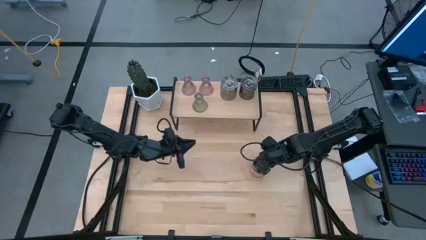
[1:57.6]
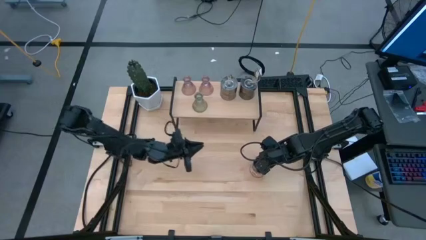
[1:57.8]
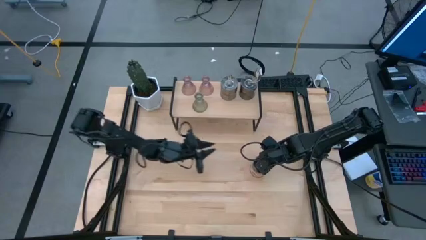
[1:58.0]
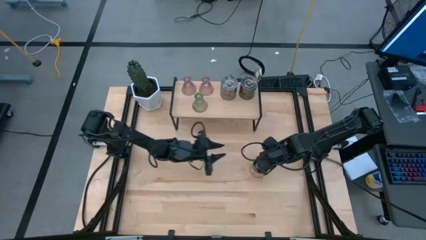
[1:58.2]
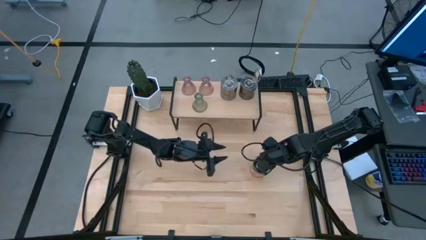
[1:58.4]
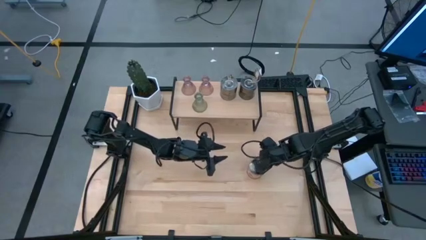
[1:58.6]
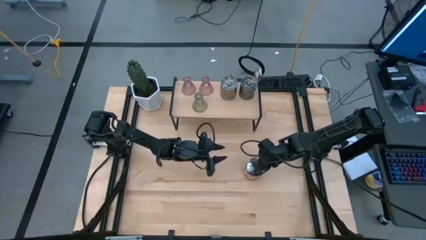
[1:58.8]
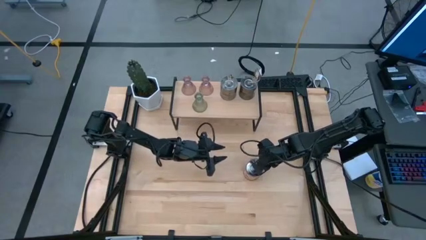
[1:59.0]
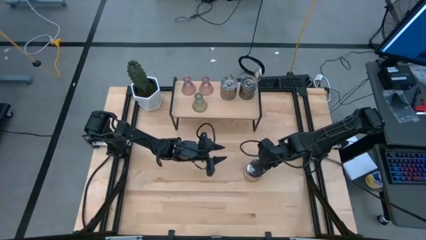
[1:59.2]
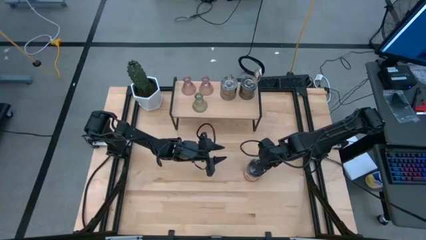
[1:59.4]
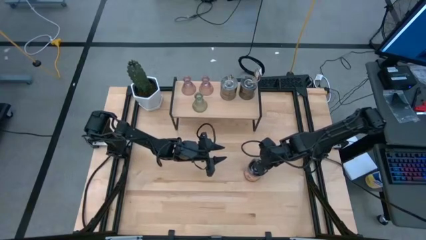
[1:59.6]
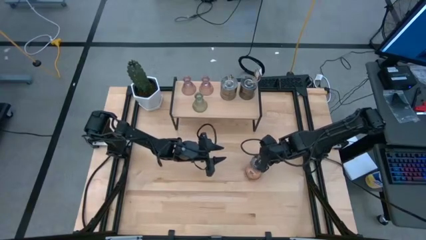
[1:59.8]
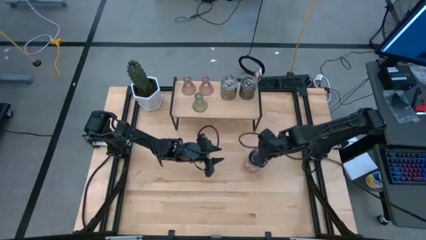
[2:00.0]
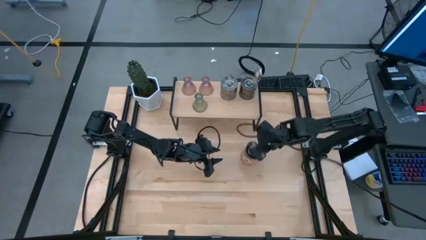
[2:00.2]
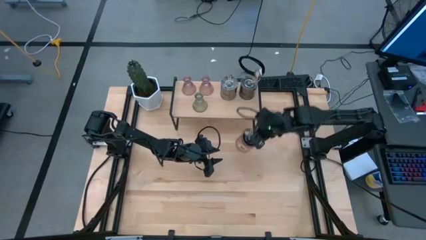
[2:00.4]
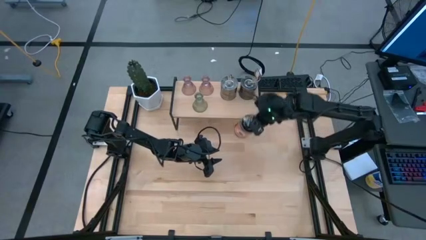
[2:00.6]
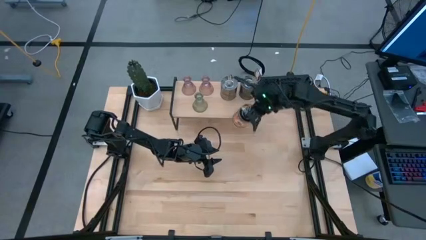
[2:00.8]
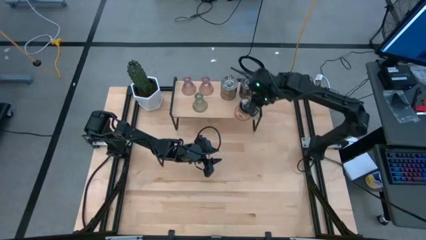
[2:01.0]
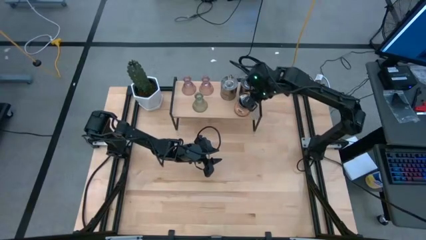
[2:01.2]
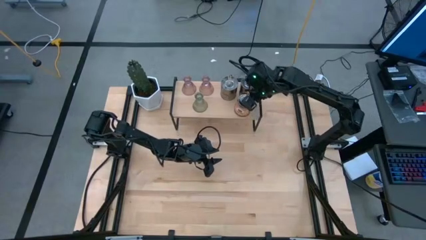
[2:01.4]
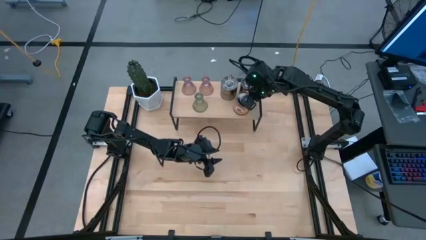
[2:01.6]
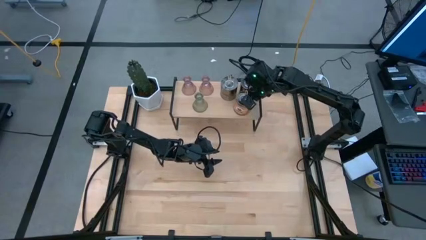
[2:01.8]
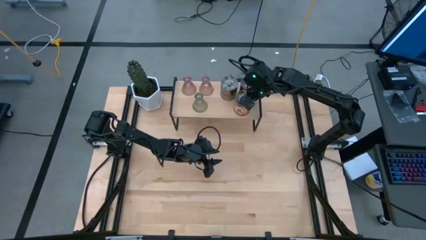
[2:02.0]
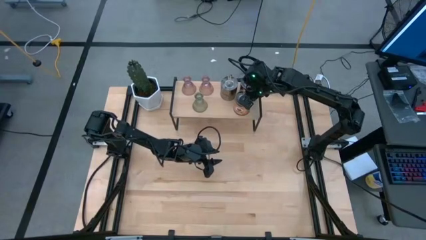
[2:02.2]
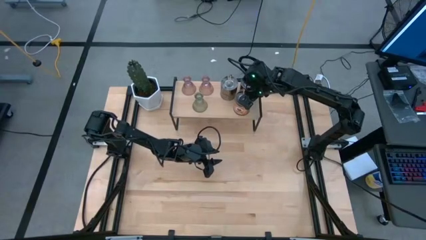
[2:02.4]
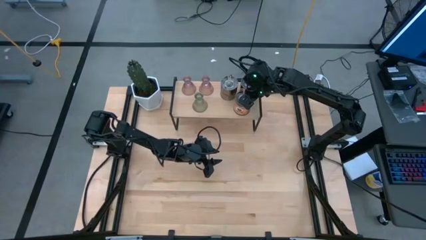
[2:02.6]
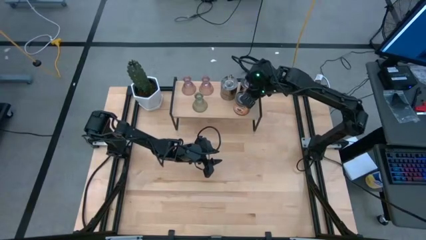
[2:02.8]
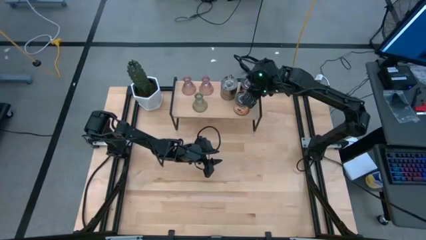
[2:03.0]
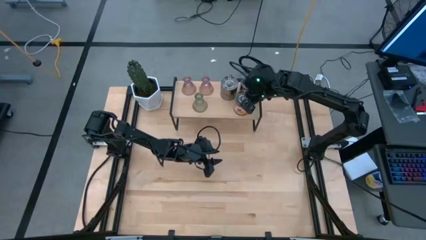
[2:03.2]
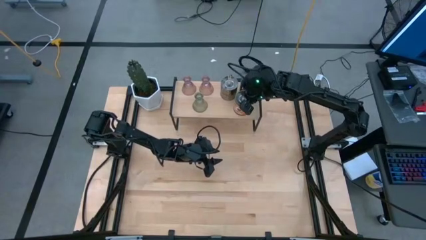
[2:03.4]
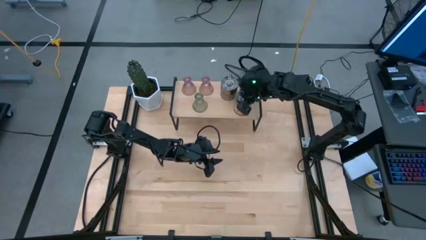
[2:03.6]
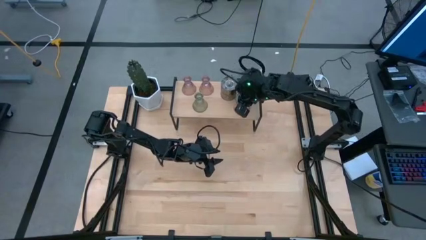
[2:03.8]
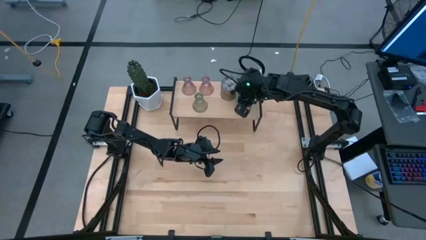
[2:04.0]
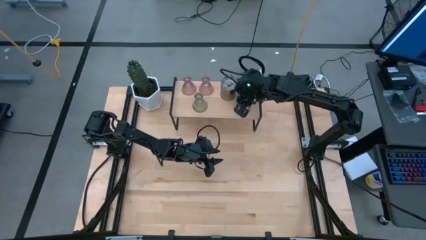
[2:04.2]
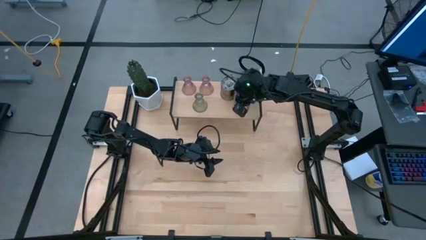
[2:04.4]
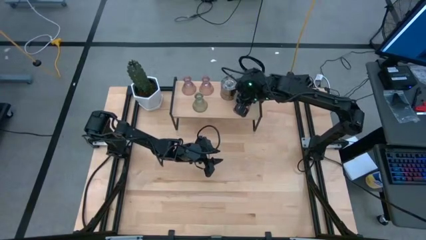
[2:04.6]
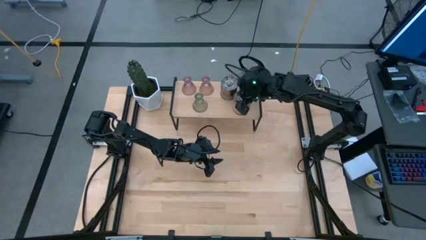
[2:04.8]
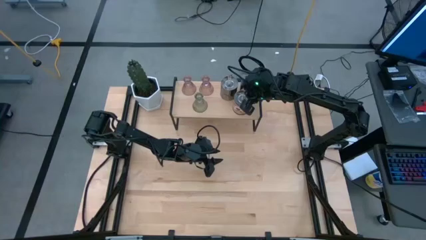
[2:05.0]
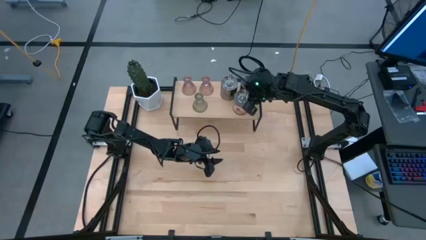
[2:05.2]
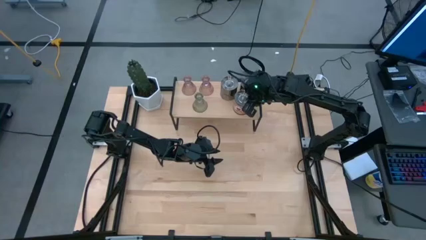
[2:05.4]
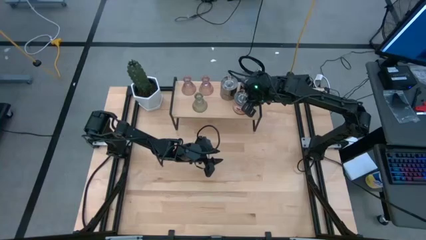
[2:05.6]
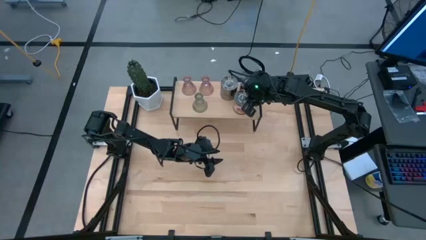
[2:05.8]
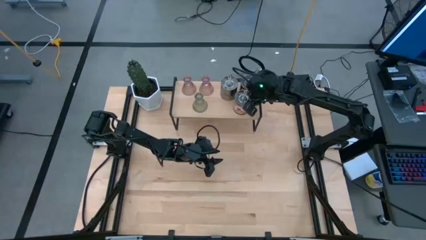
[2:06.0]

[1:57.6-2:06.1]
Task: Pick & Place candle stick holders
Put the silver scented candle on the shelf

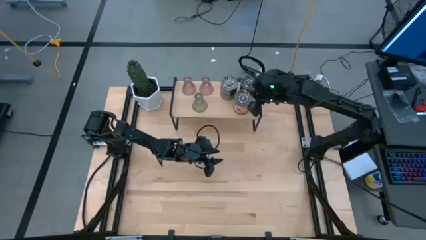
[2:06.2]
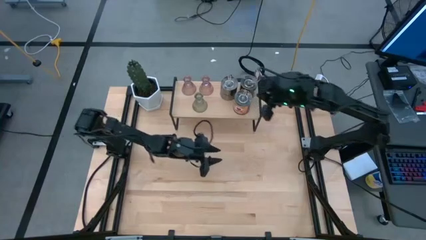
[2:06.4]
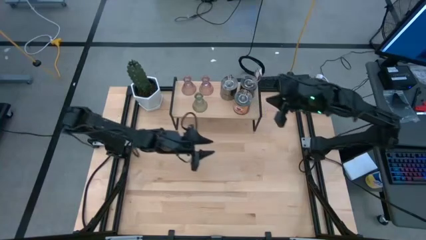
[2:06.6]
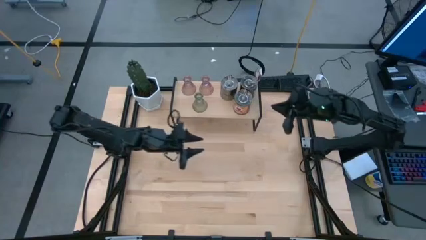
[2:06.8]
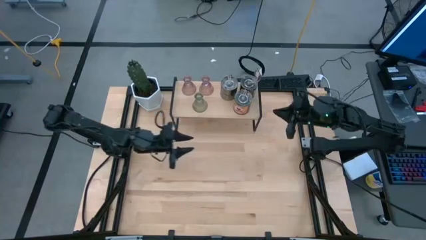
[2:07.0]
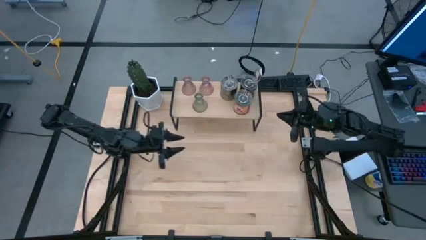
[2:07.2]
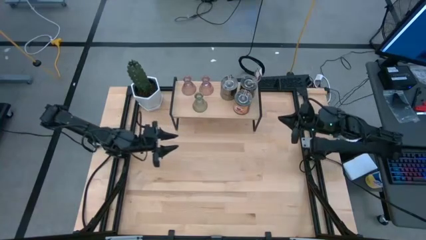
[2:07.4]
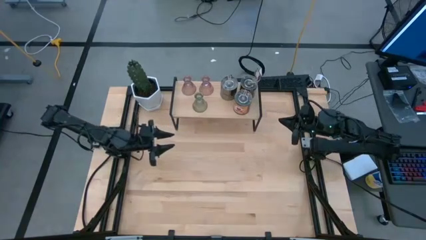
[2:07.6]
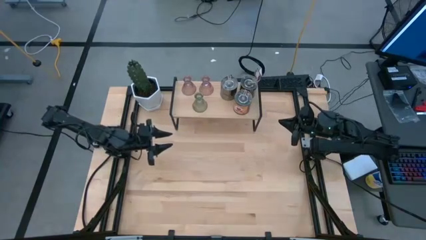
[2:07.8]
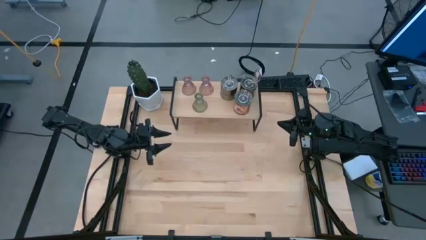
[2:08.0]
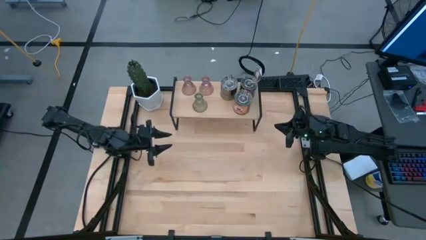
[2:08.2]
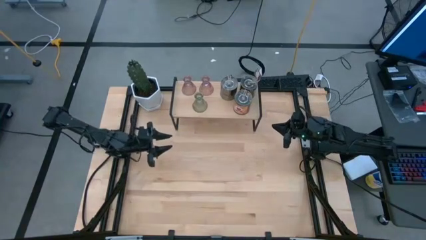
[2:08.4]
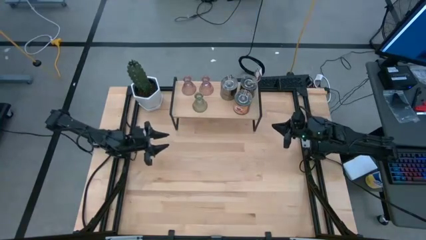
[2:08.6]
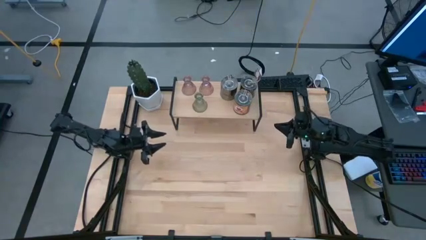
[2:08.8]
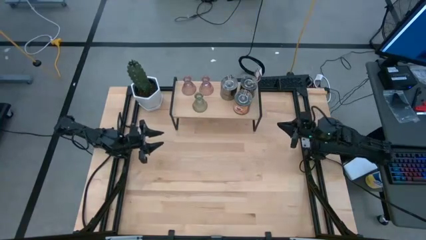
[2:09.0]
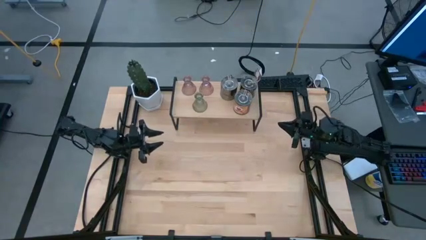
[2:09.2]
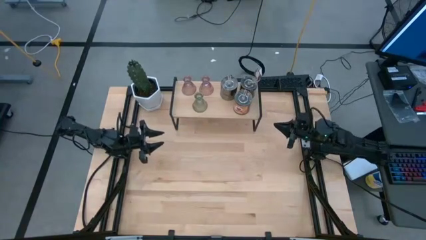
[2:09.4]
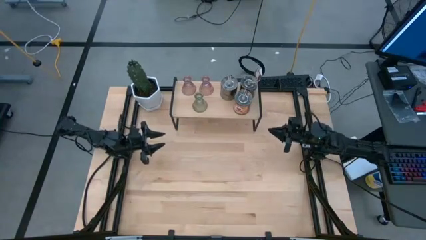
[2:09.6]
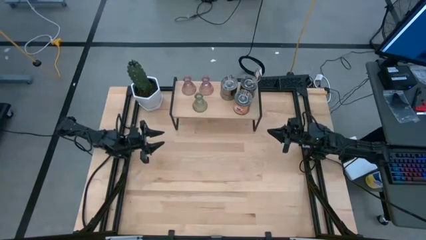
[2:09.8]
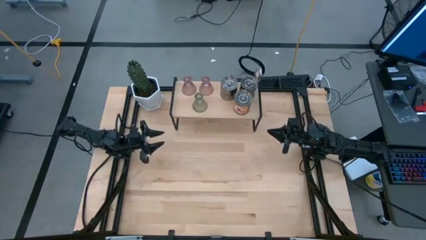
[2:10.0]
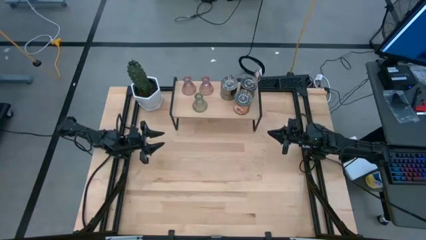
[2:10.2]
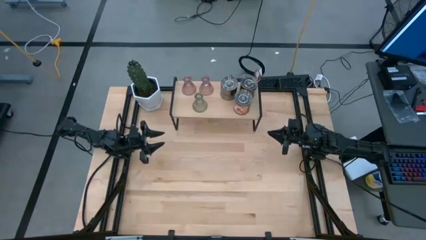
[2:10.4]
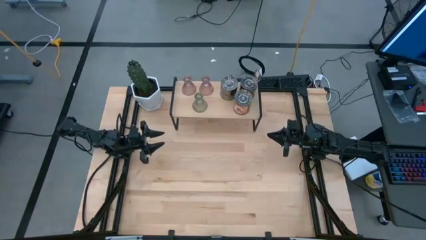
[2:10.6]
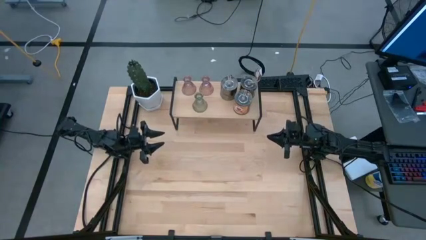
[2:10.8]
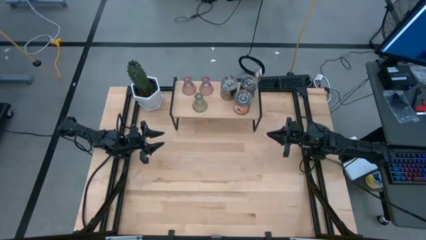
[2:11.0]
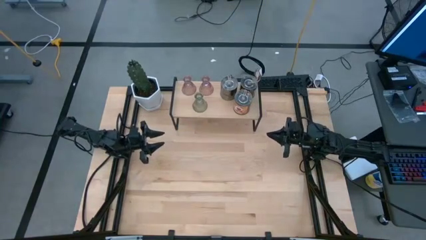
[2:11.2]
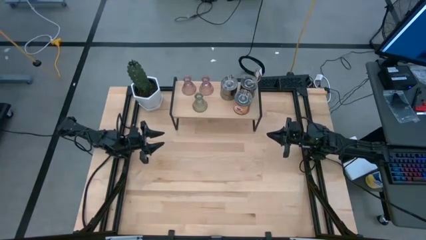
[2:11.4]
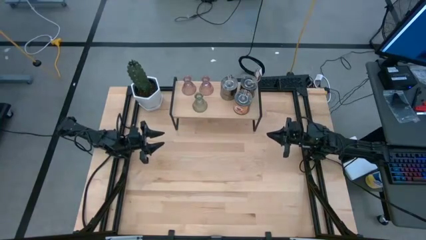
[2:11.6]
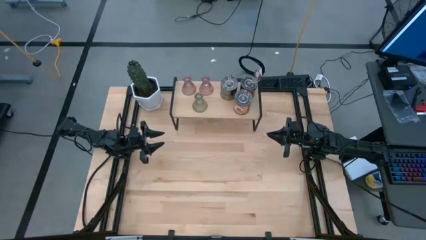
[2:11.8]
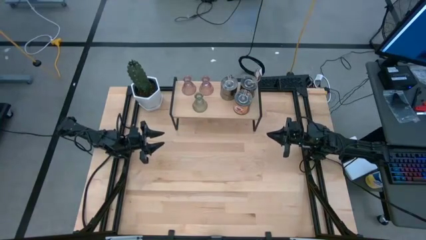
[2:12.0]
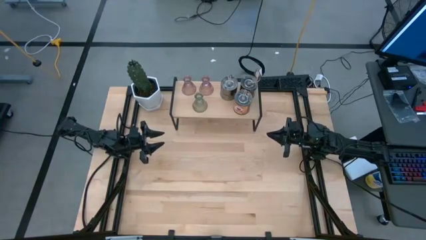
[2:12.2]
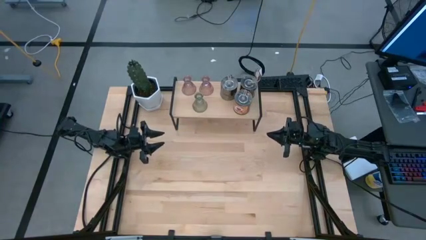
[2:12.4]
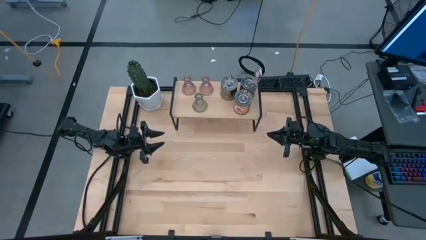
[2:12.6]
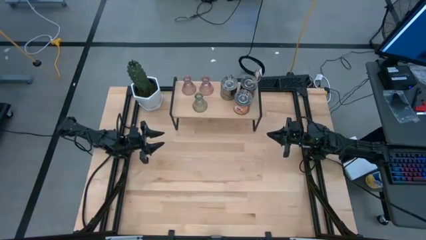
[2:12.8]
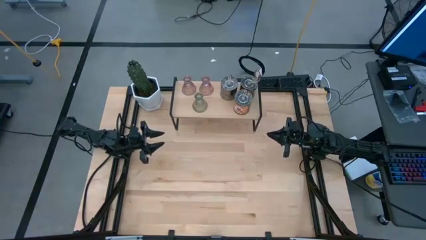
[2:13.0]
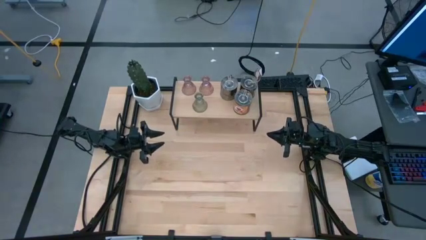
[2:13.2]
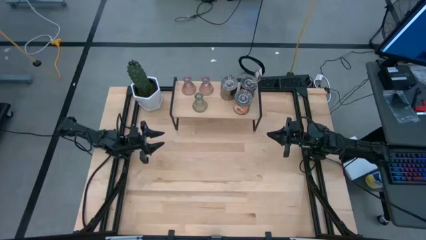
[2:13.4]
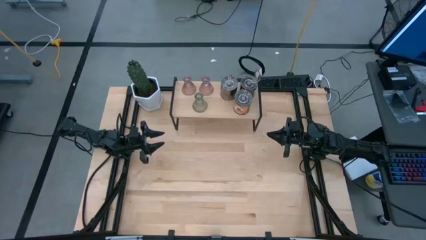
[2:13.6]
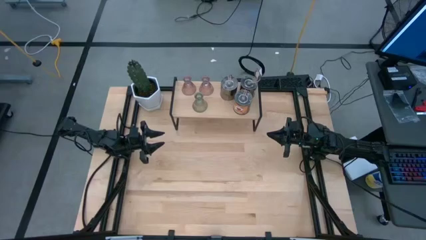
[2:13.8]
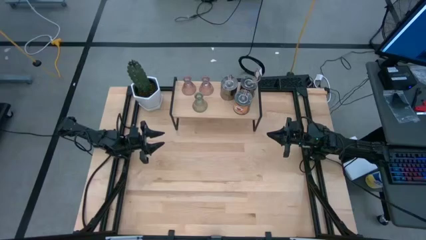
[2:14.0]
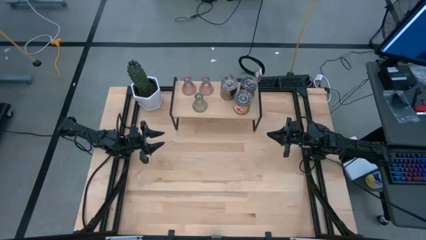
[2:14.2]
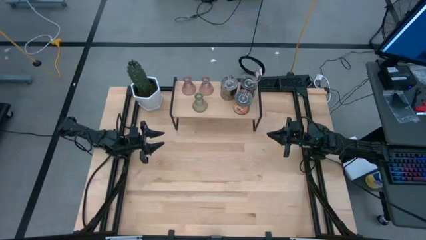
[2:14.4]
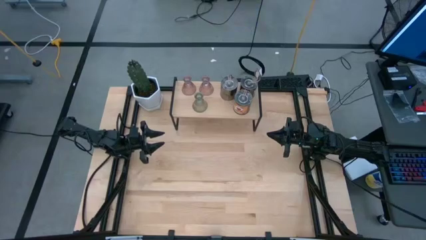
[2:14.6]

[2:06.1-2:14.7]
Return to Home Position
